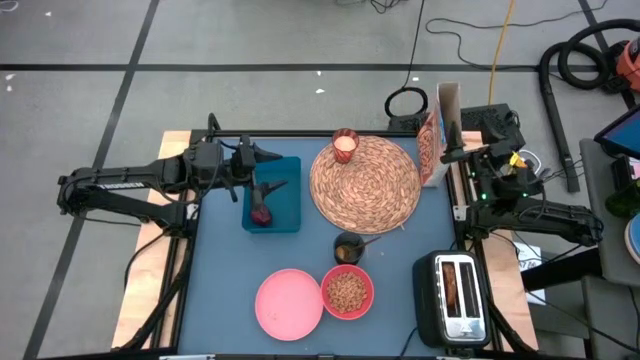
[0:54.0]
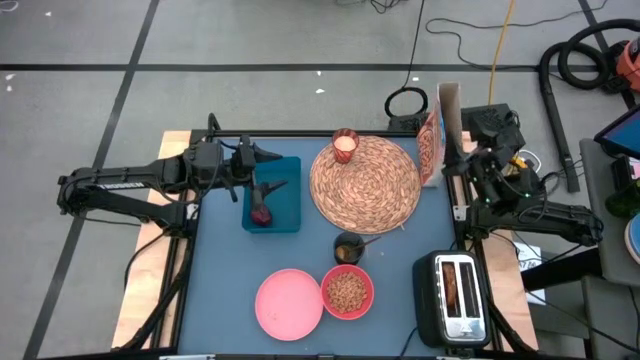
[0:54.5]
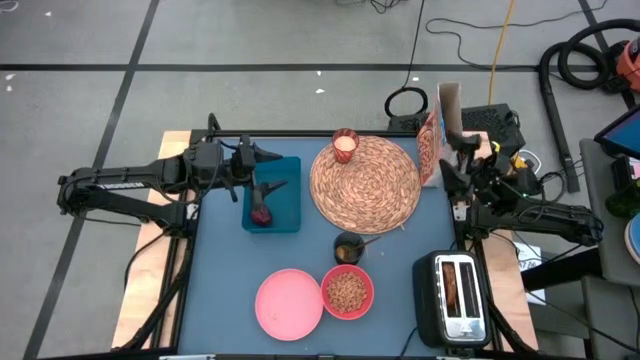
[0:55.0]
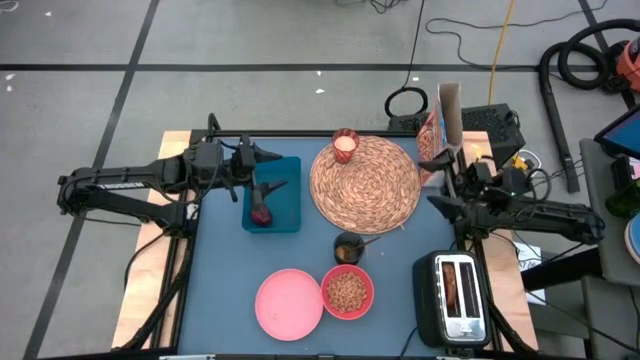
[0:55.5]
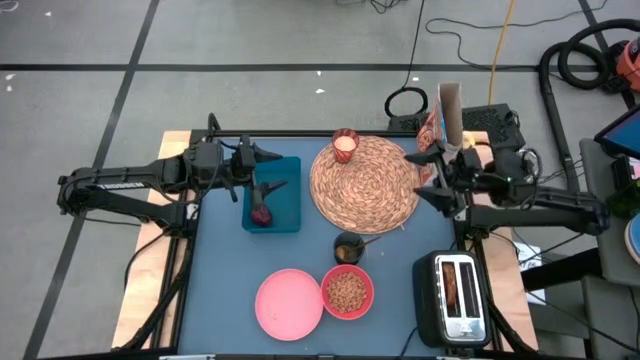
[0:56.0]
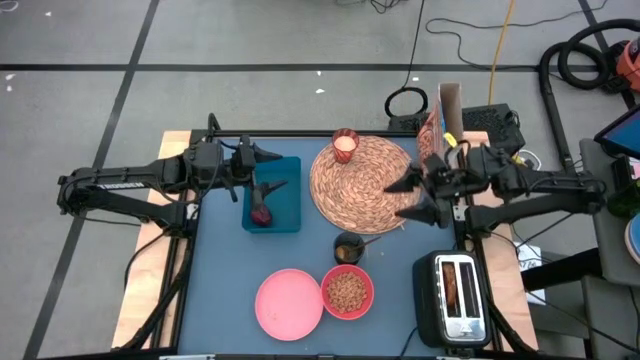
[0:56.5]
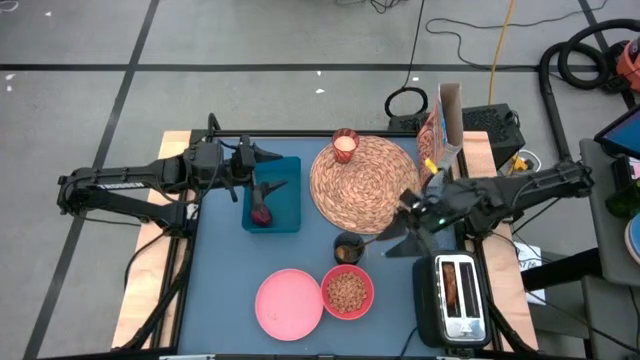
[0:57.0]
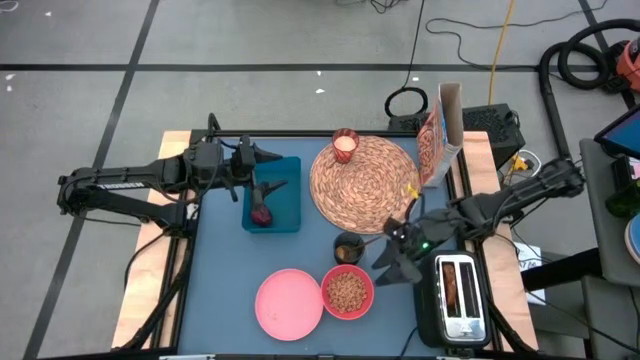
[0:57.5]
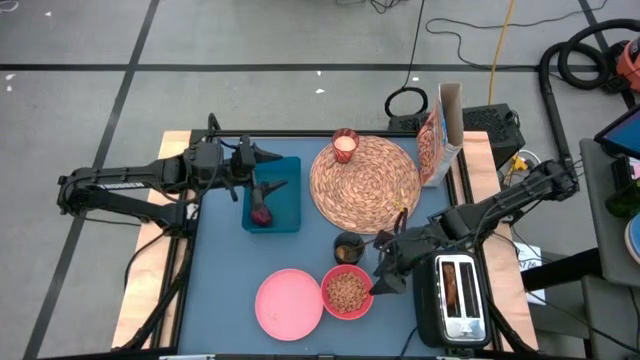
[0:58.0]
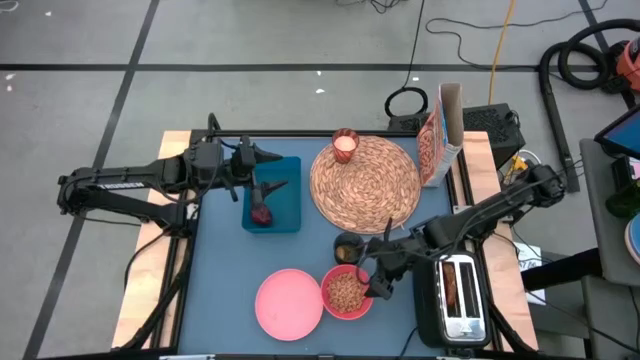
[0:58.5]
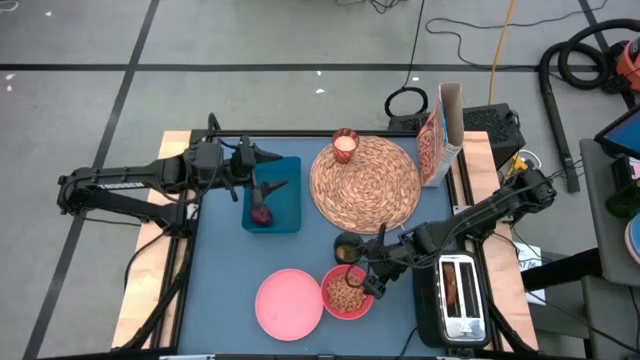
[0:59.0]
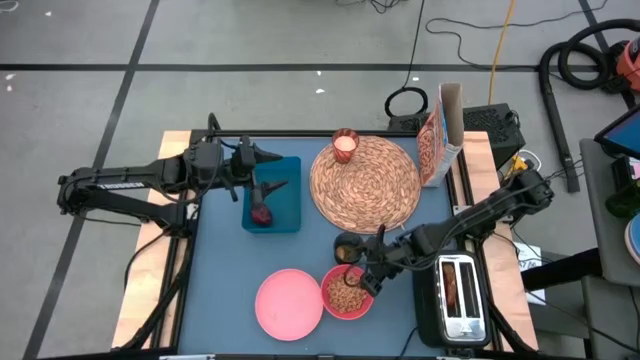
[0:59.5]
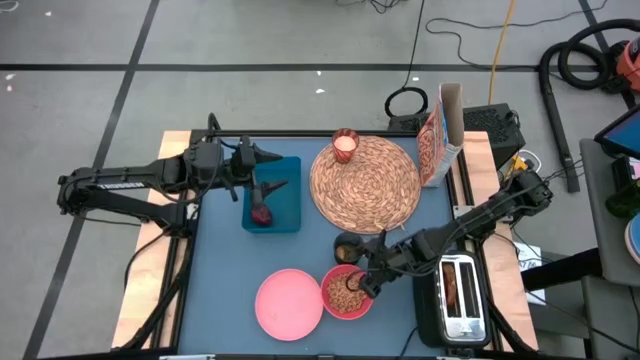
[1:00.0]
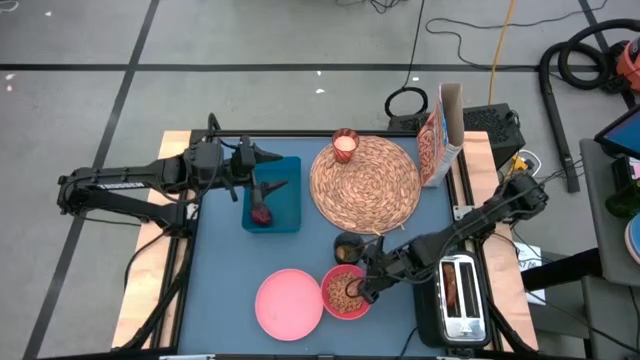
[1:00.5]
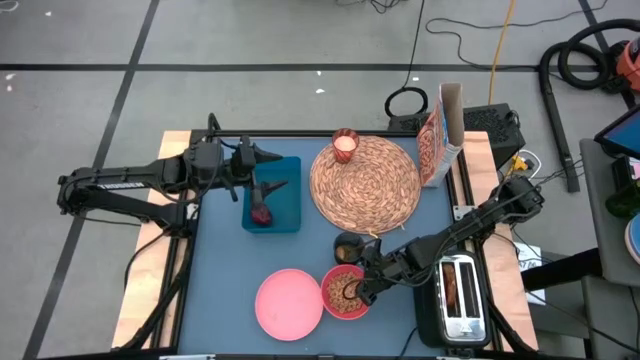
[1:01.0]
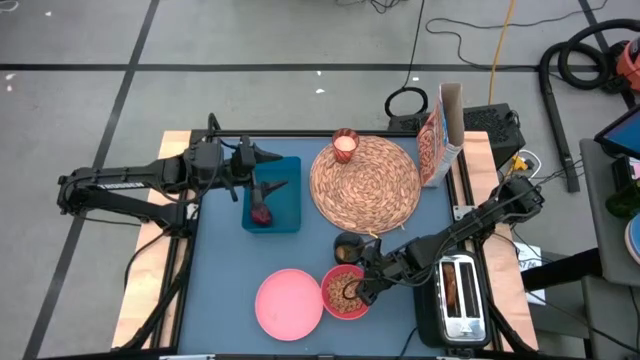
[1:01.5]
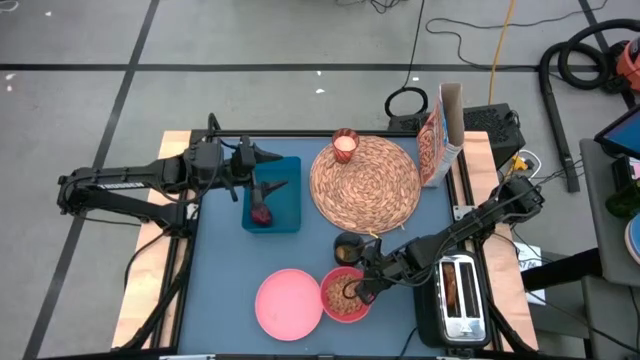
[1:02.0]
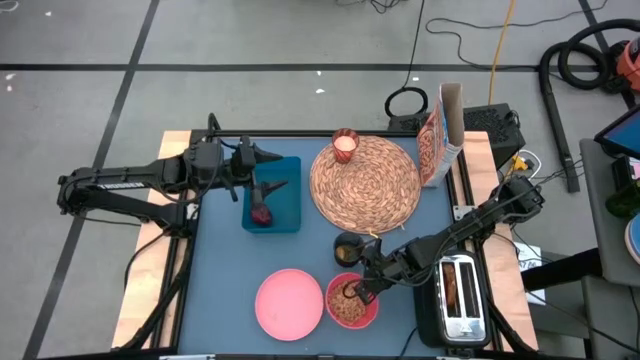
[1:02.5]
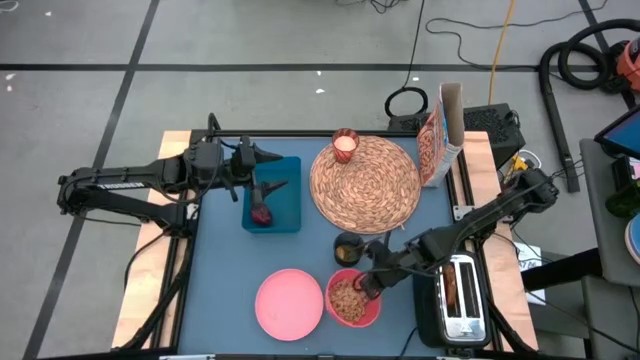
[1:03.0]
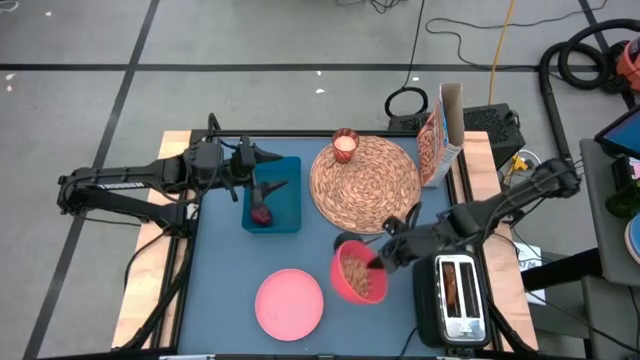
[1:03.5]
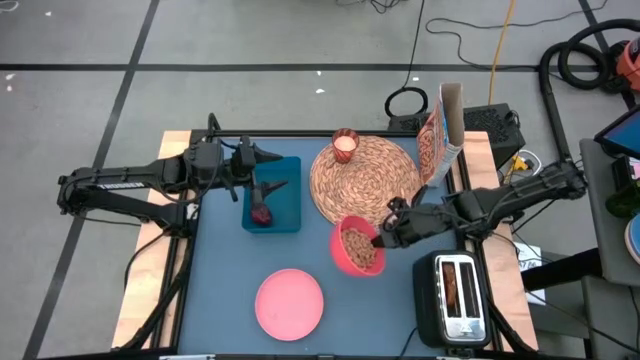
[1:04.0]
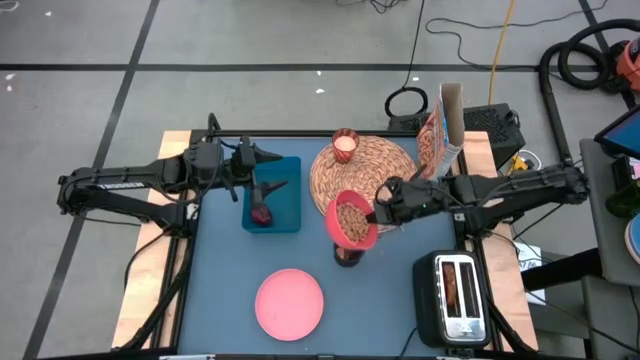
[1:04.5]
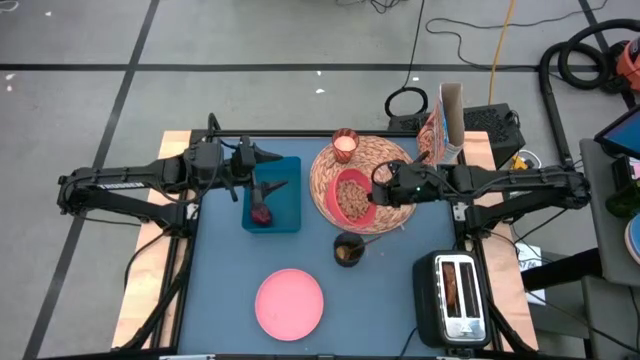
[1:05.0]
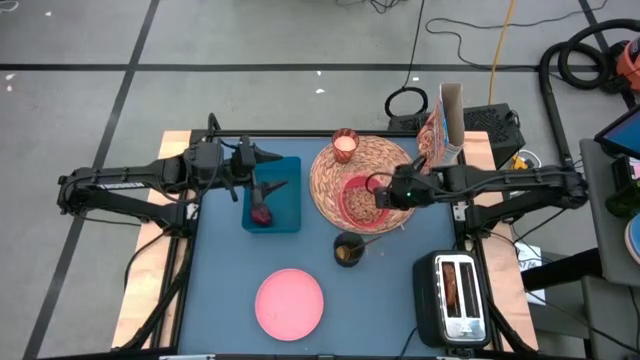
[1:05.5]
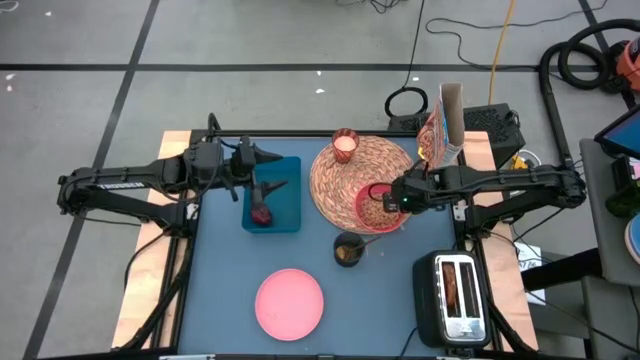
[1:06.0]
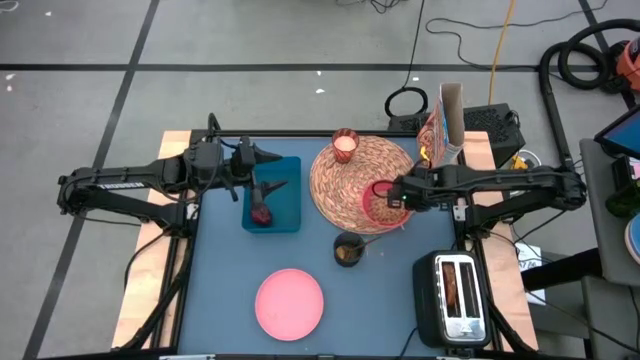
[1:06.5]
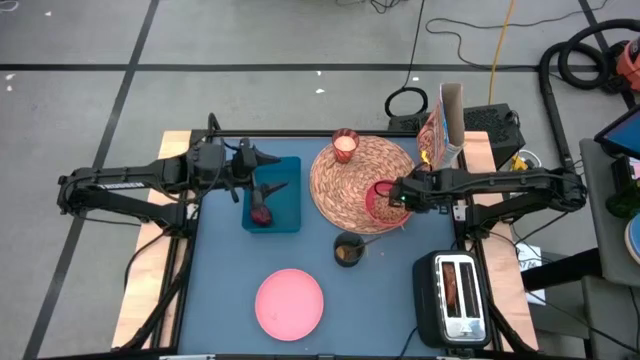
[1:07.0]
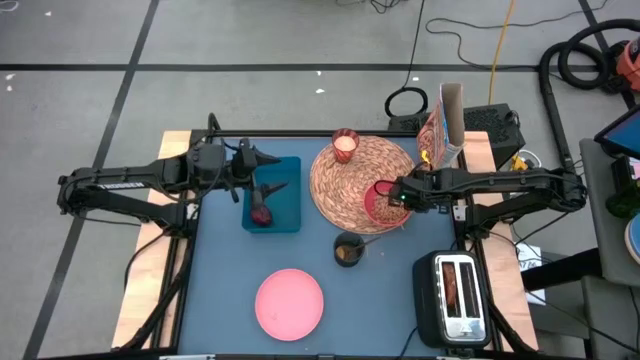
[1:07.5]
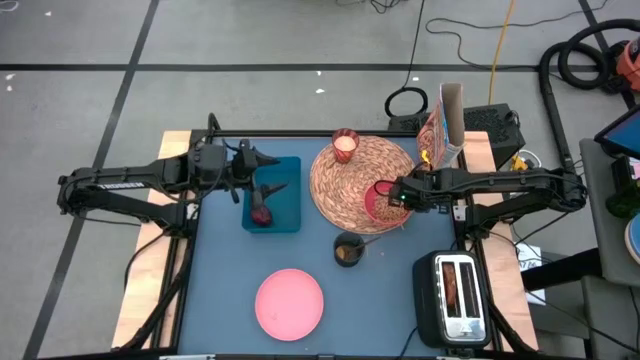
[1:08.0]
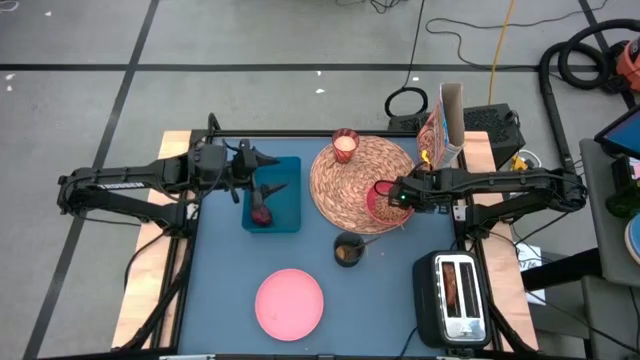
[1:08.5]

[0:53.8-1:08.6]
Task: Arrange a breakfast setting
Put the pink bowl with cereals to the bottom right side of the brown placemat

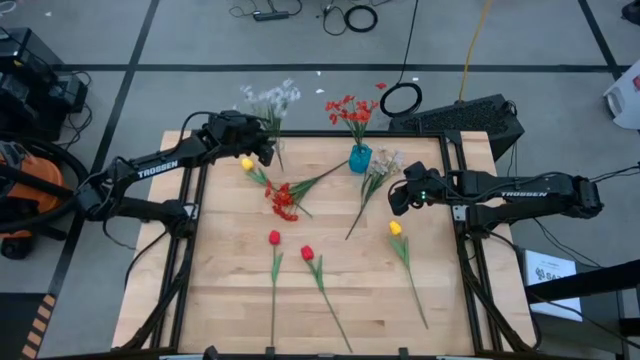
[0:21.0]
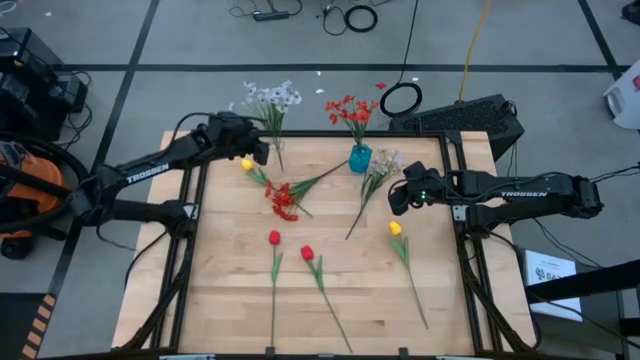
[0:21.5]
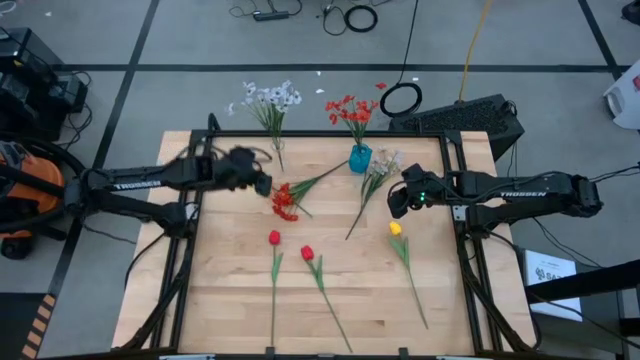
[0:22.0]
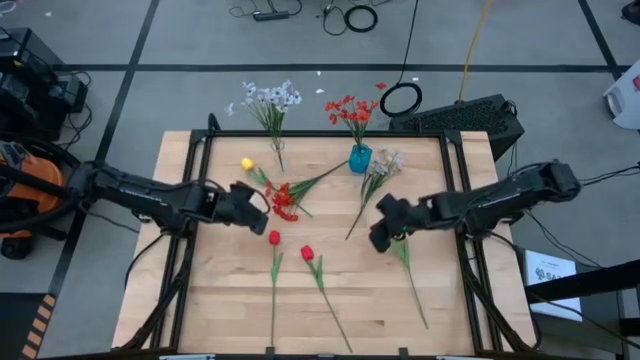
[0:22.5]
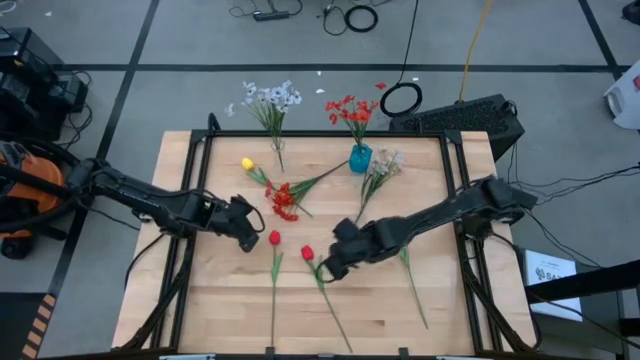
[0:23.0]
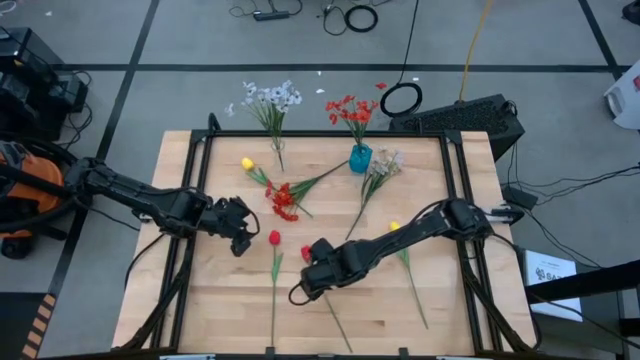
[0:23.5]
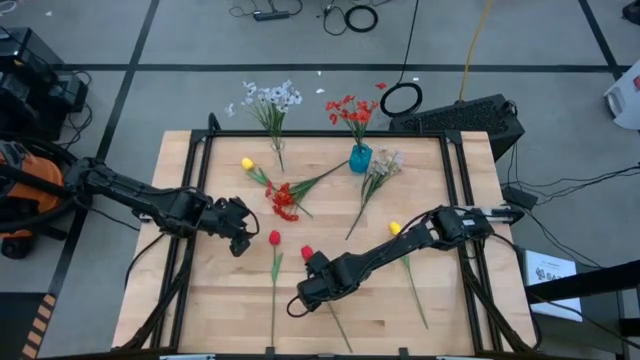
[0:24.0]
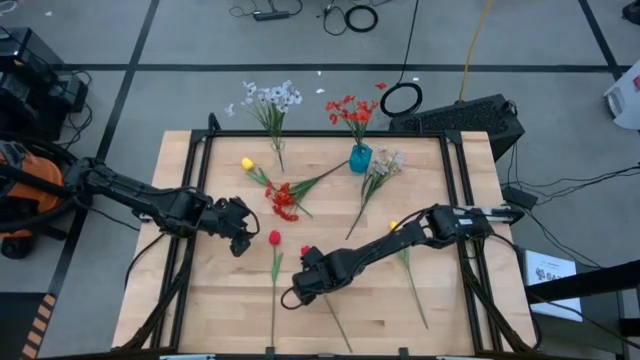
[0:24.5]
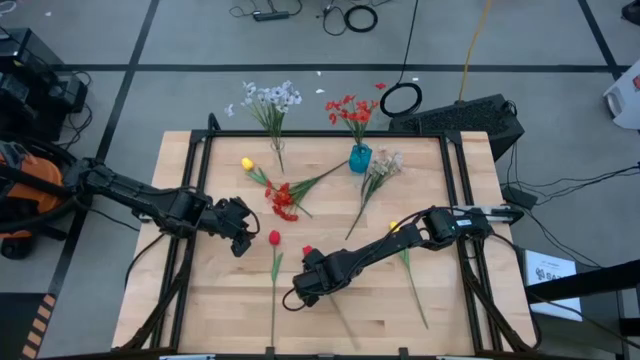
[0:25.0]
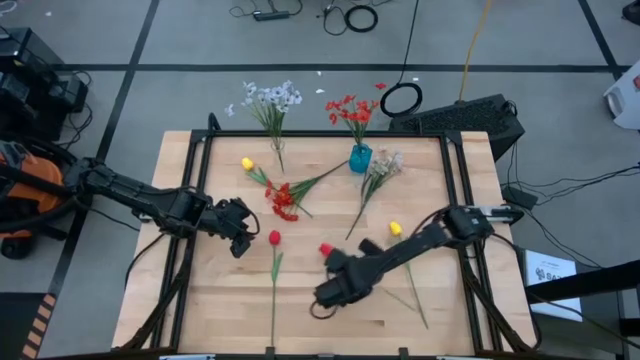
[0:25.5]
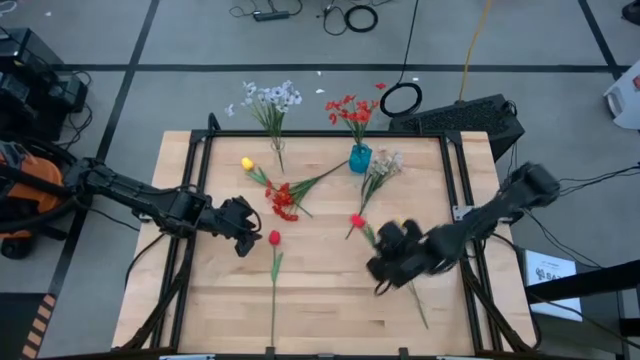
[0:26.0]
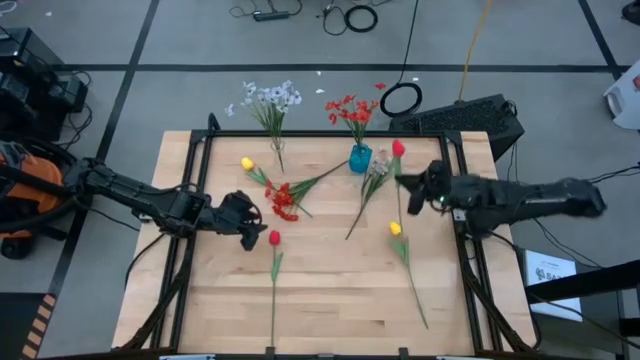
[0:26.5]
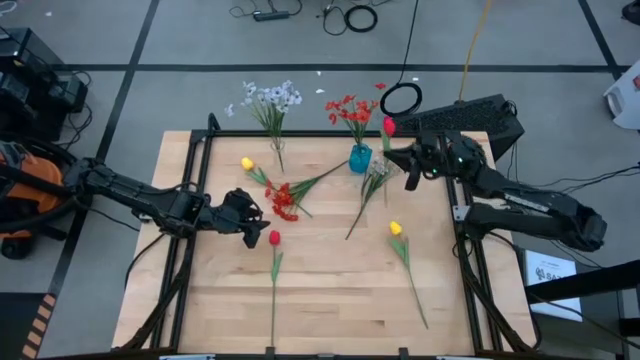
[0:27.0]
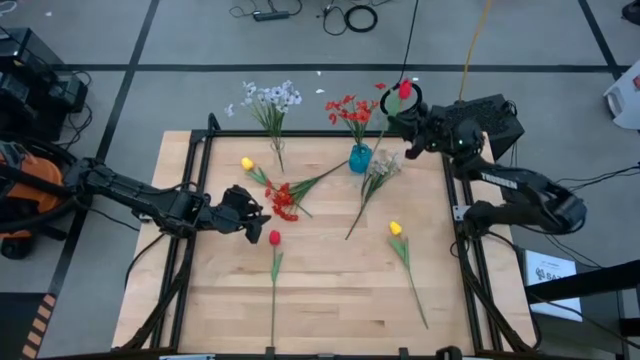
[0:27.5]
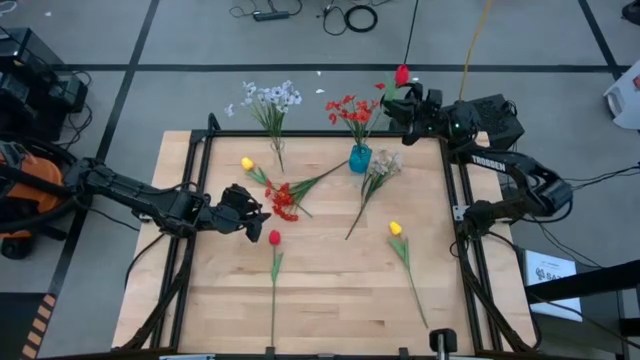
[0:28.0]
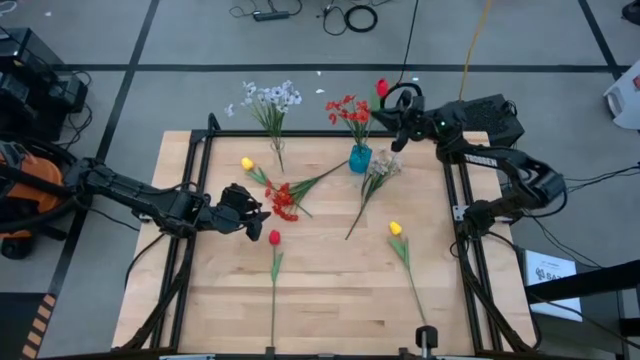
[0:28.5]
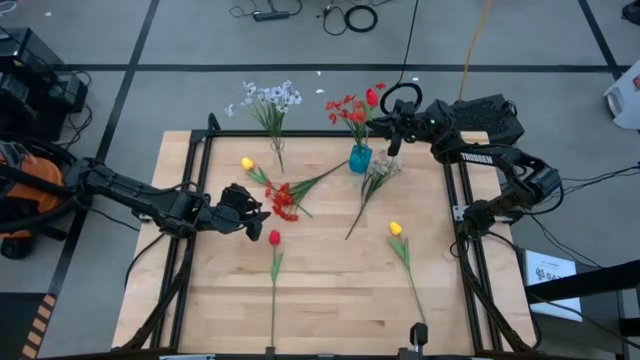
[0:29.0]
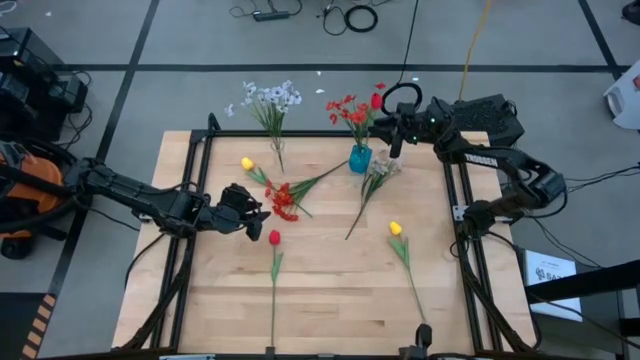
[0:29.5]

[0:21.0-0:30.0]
Task: Sort flowers into vase by color
Put the red flower into the blue vase
